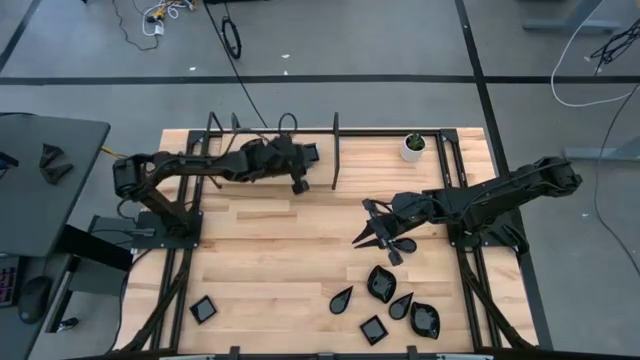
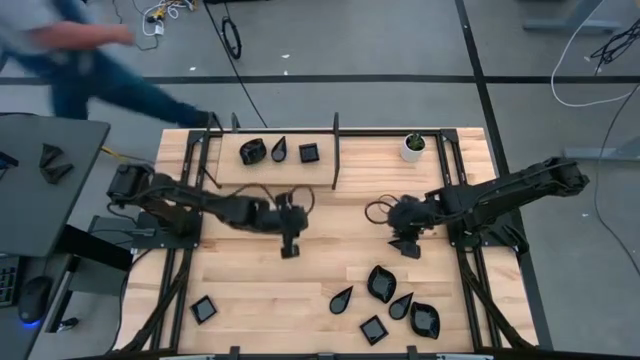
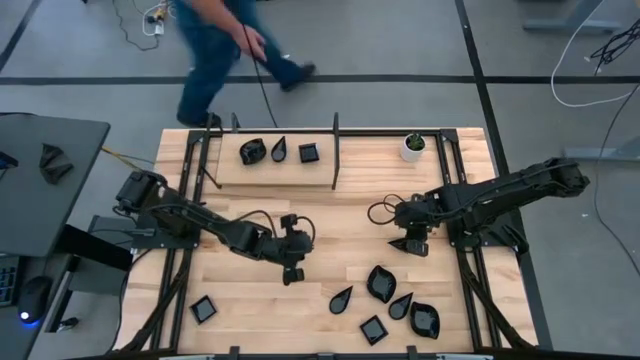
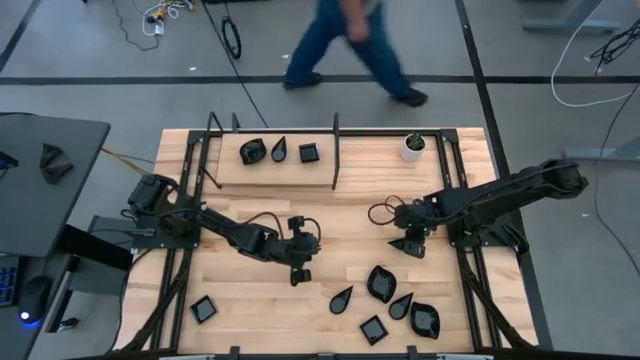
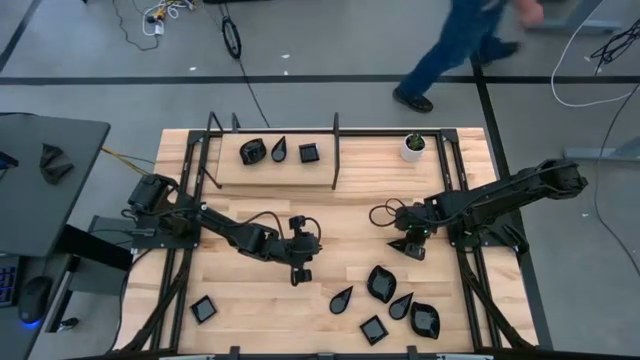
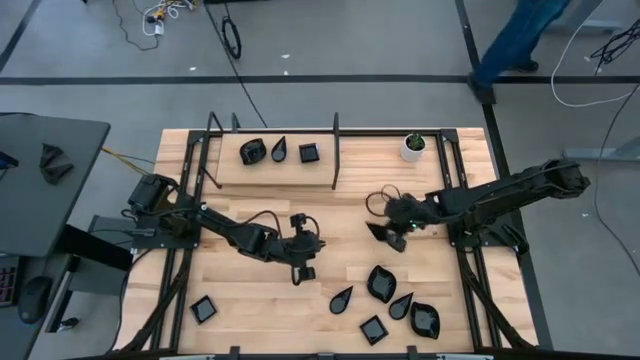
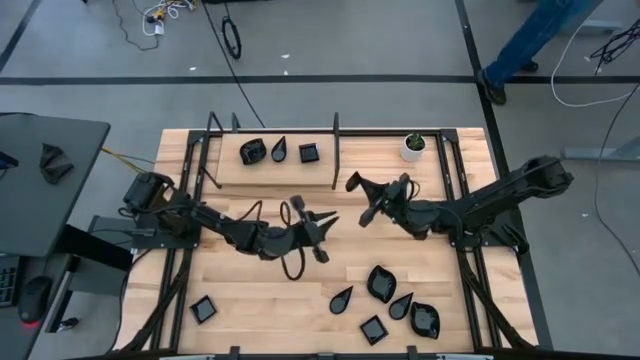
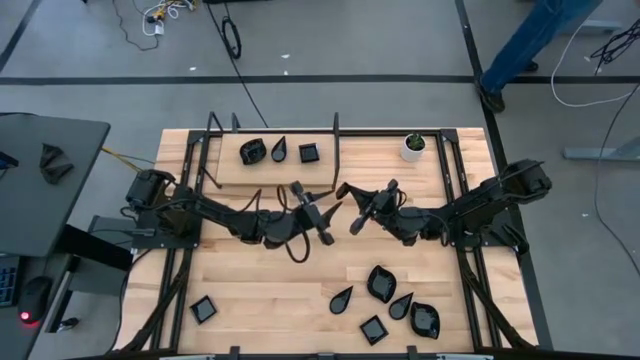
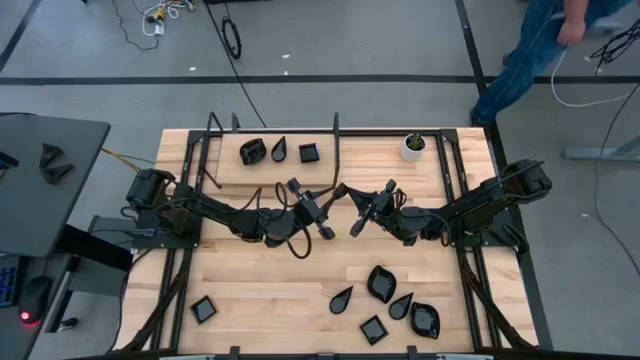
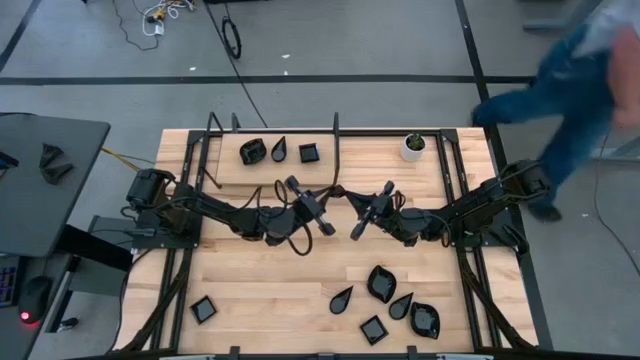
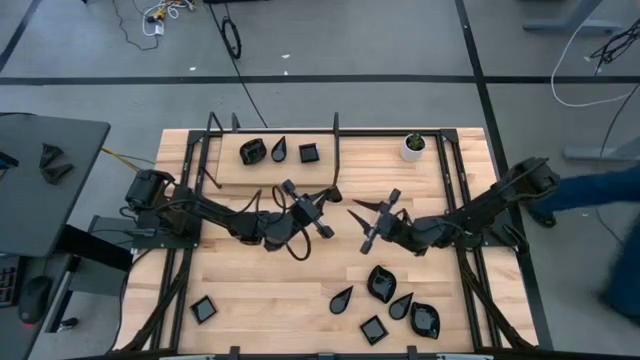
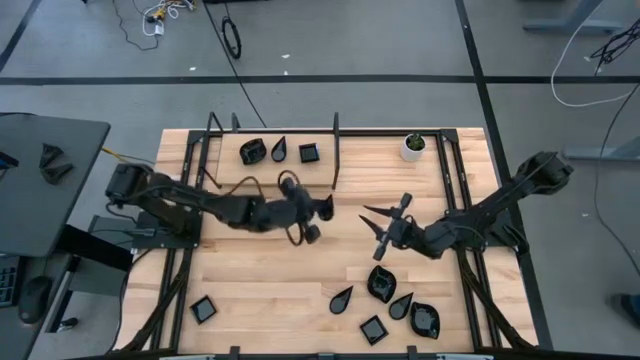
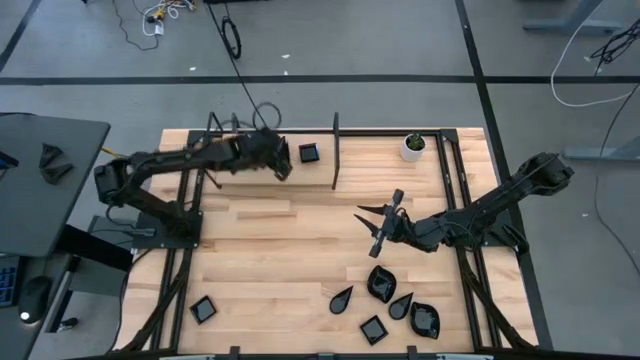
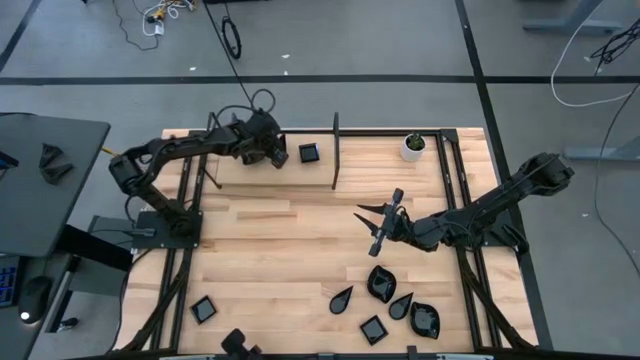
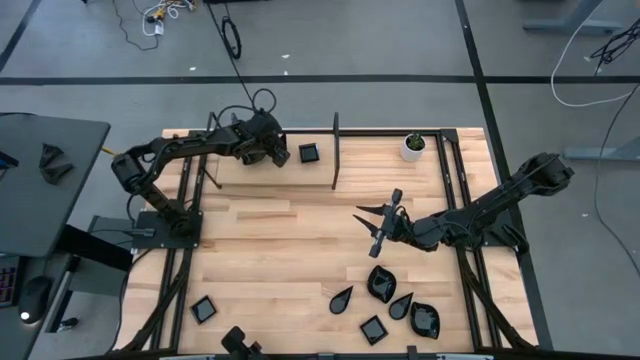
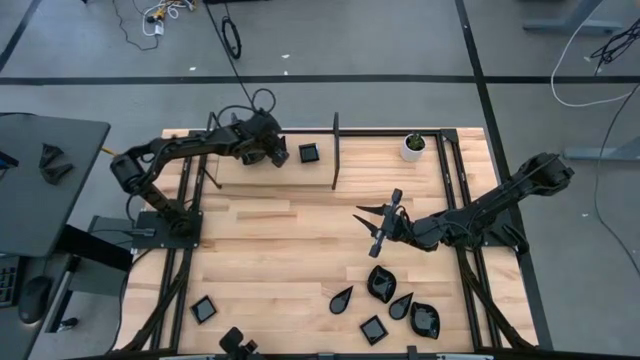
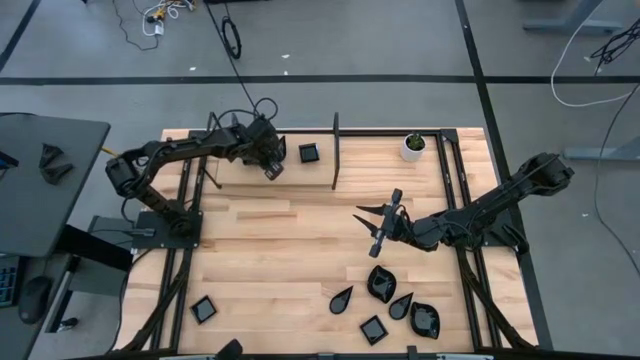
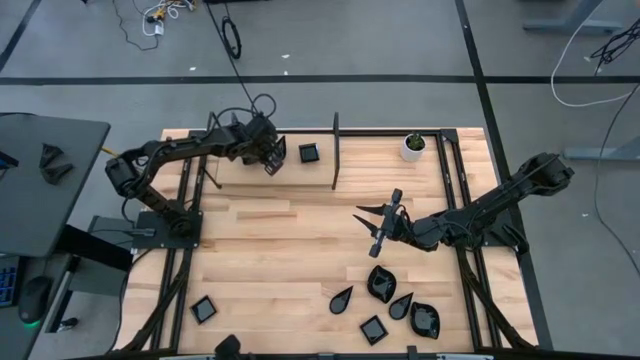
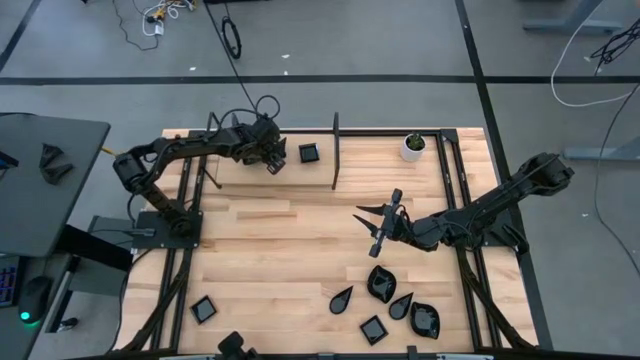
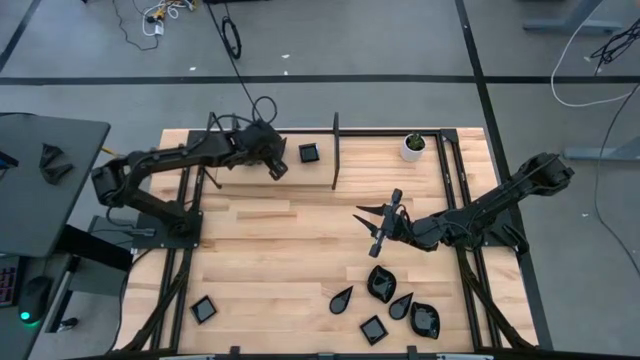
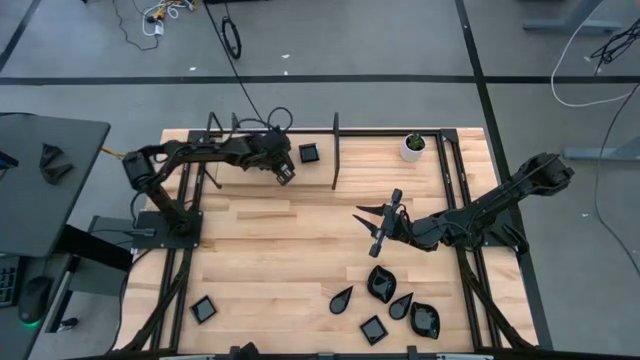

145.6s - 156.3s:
Task: Pick & Place Mini shaped plates
Stack the black drop-shaped plate on top of the stacked black drop-shaped plates on the shelf

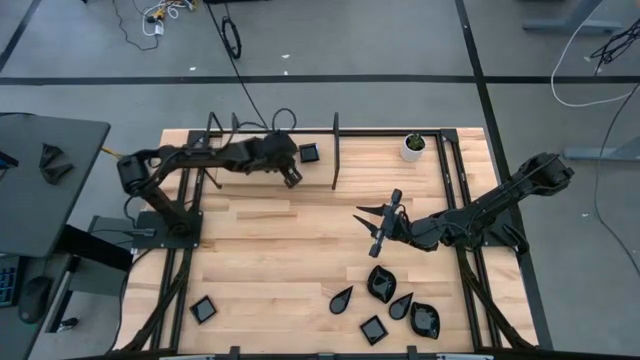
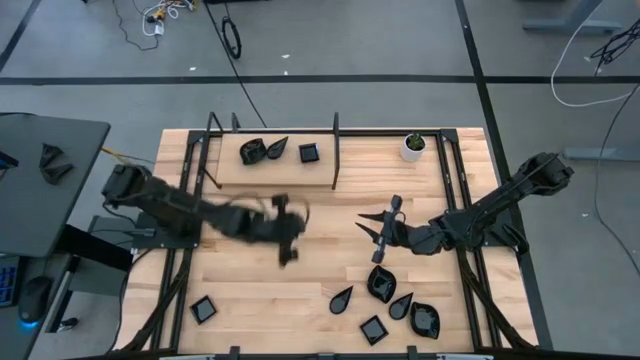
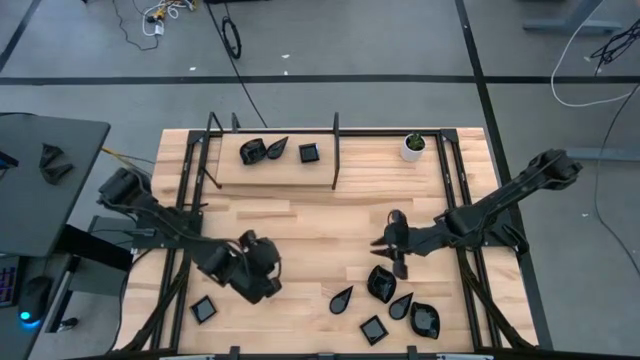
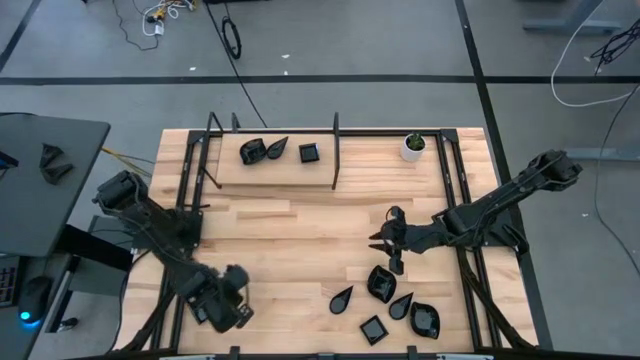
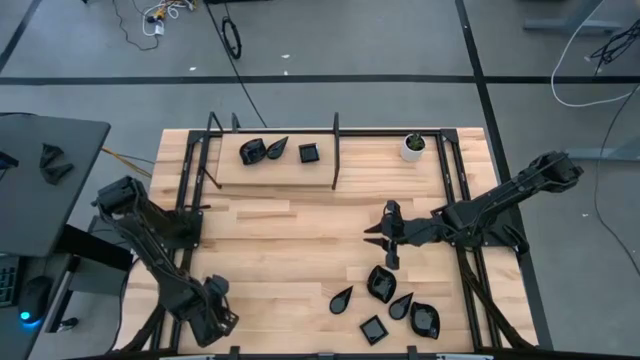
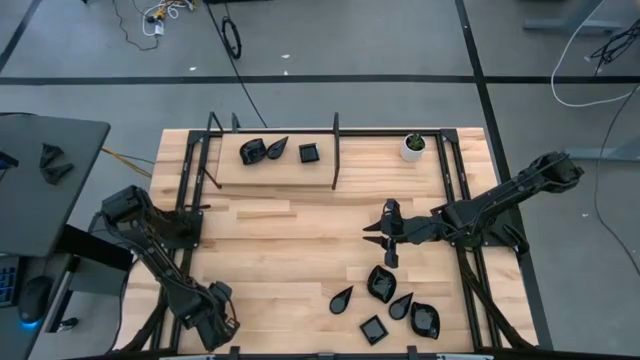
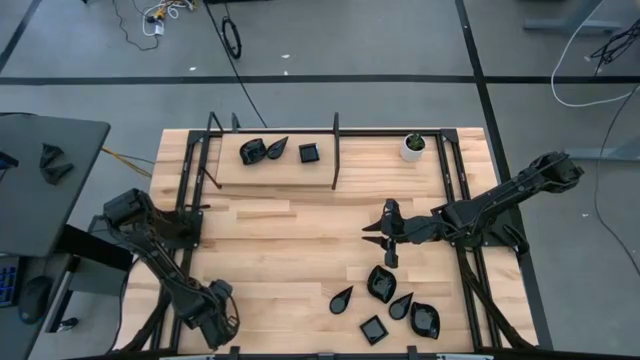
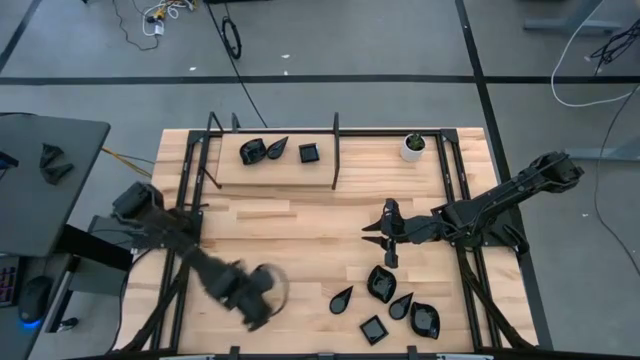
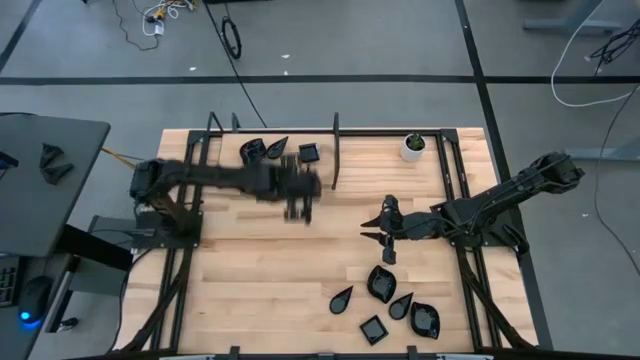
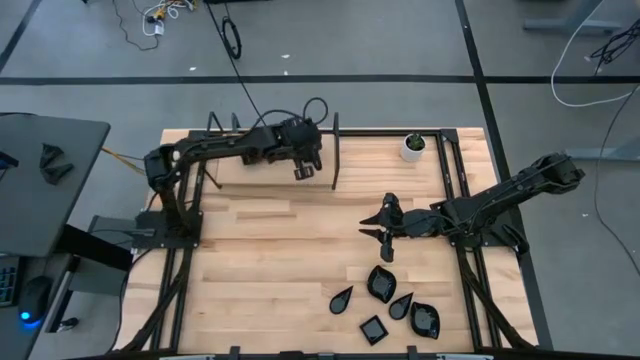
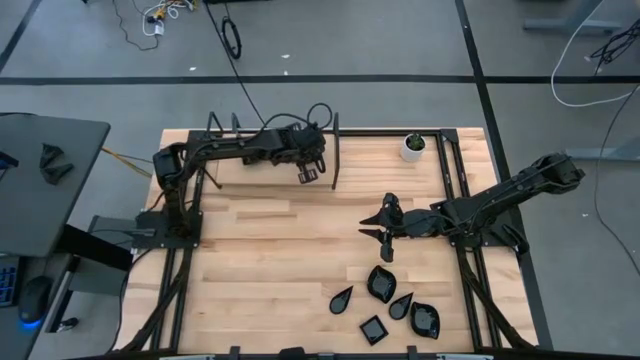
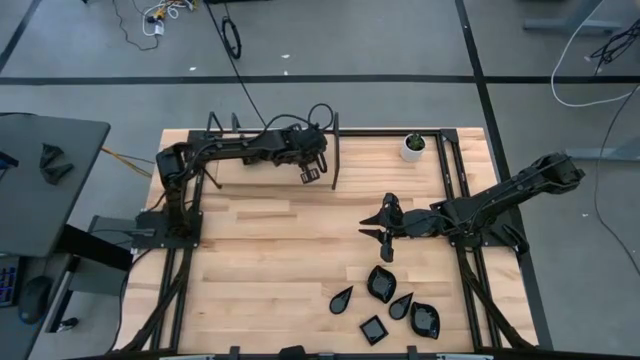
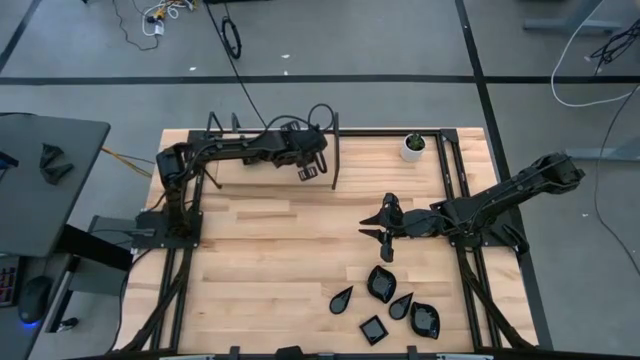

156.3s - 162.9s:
Stack the black square plate on top of the stacked black square plates on the shelf

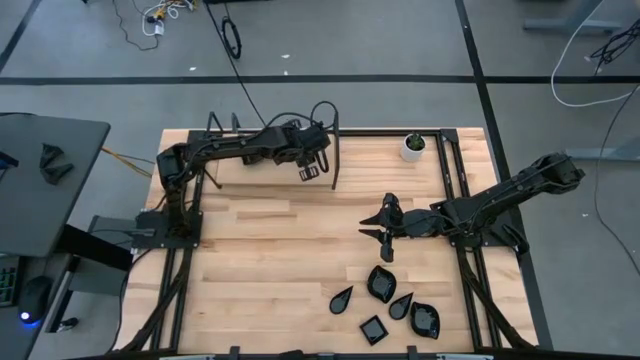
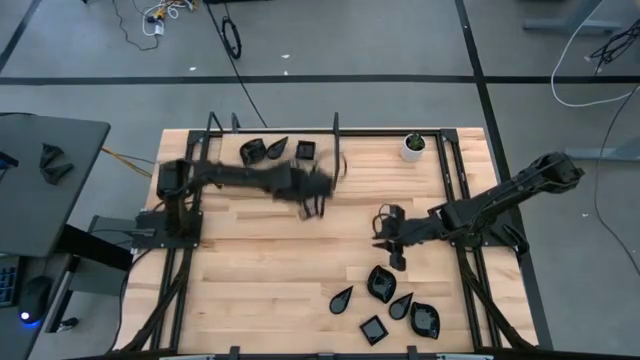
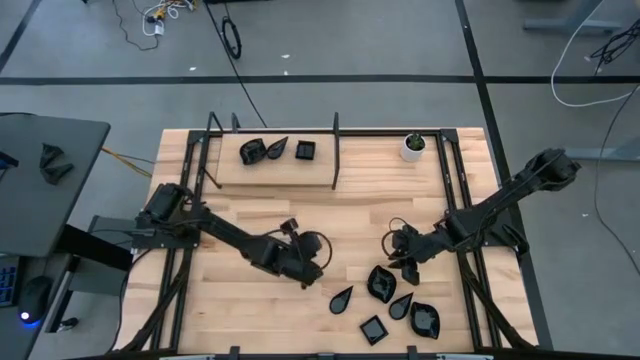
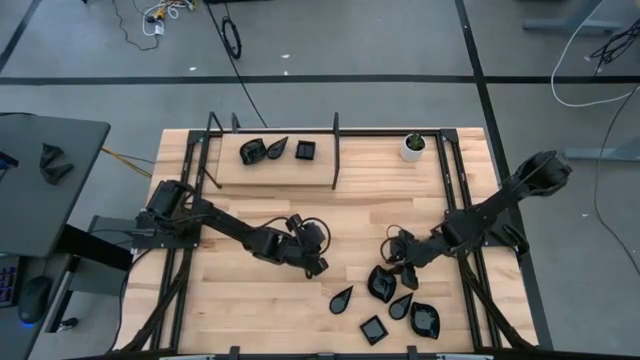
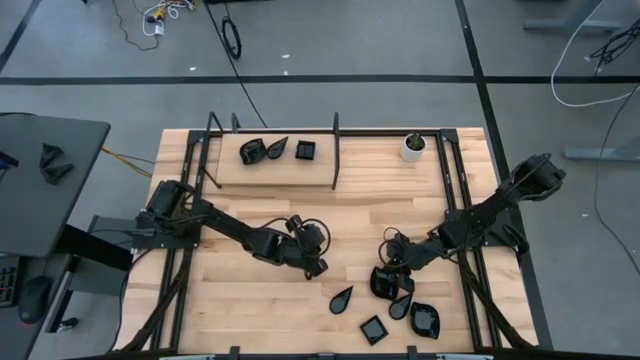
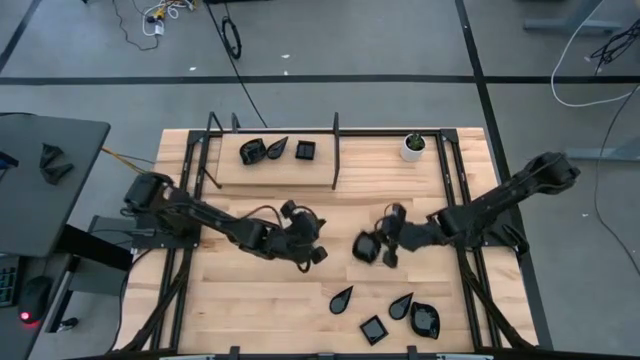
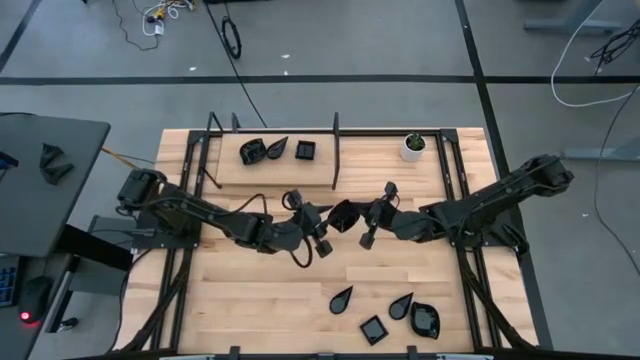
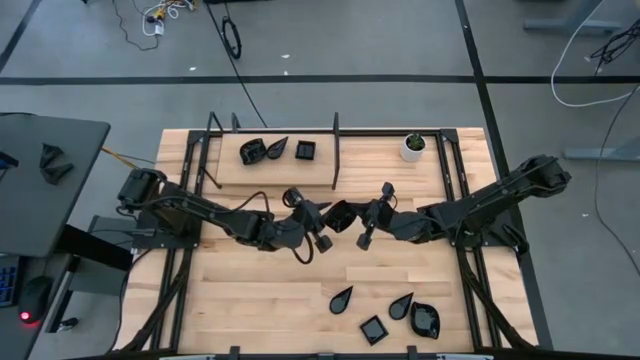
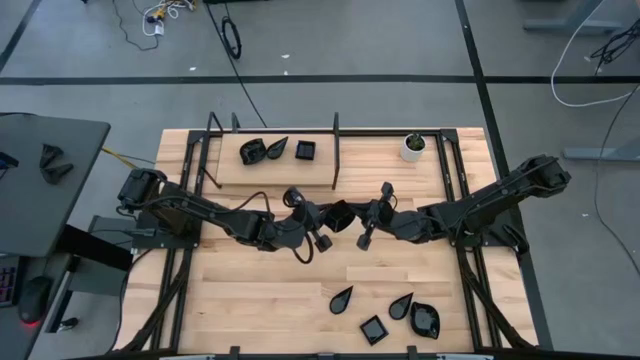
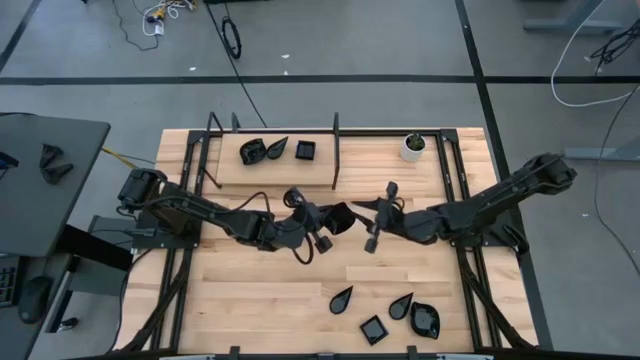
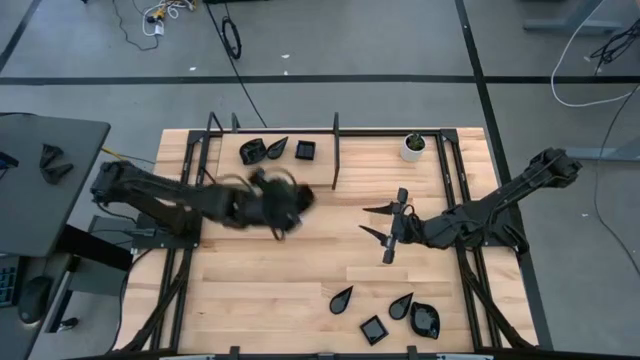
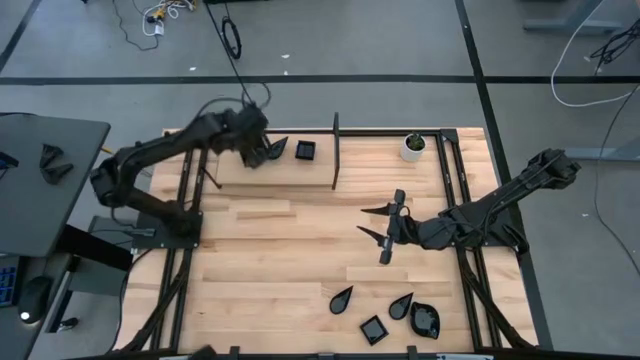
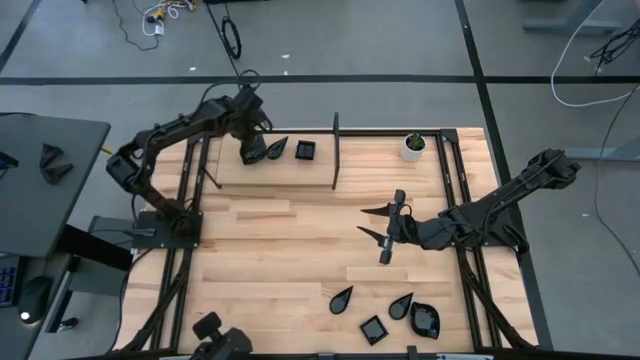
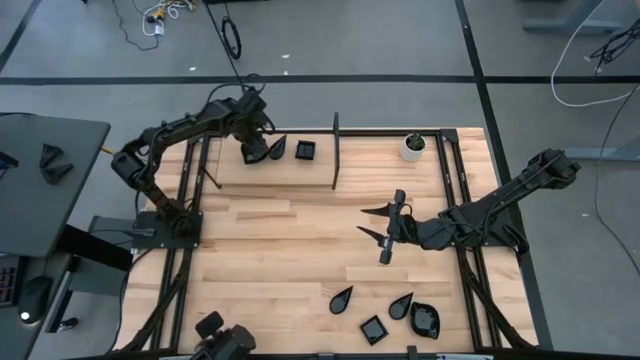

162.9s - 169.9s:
Stack the black leaf-shaped plate on top of the stacked black leaf-shaped plates on the shelf
